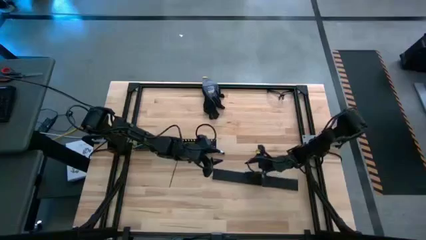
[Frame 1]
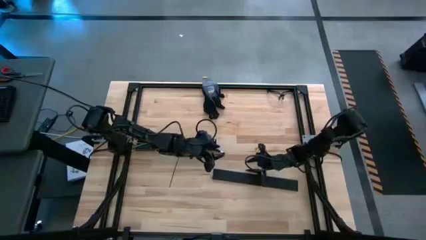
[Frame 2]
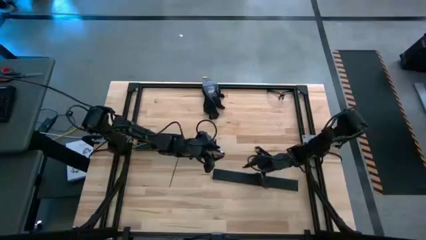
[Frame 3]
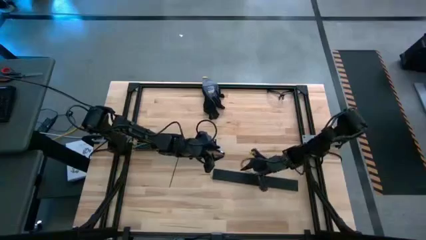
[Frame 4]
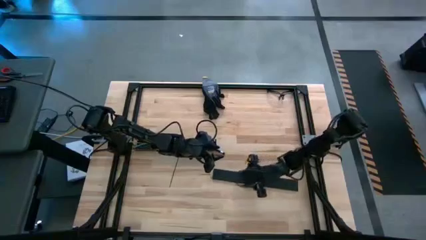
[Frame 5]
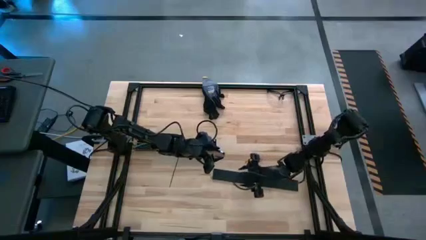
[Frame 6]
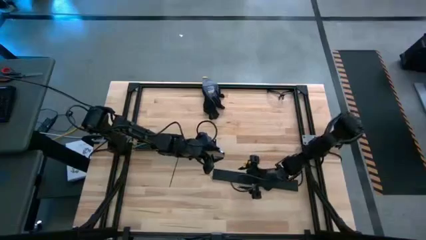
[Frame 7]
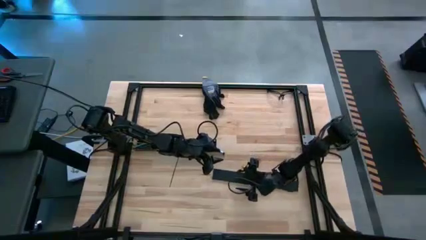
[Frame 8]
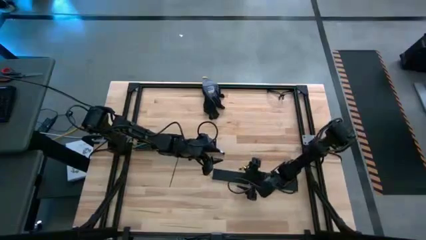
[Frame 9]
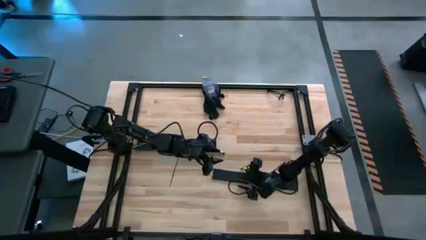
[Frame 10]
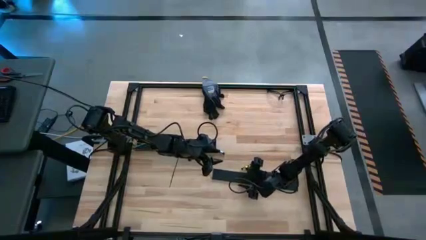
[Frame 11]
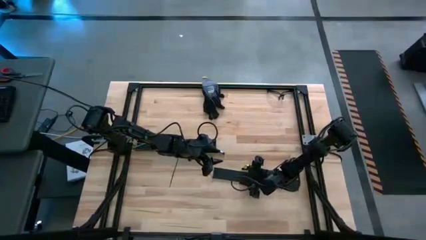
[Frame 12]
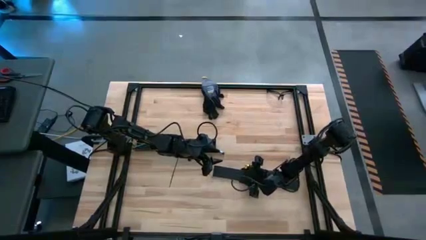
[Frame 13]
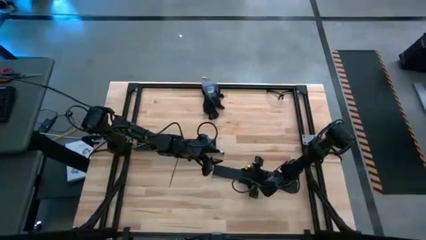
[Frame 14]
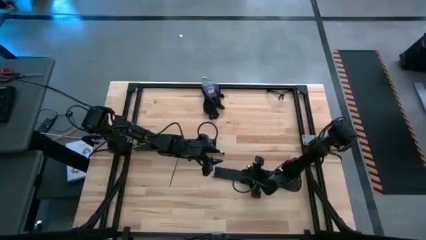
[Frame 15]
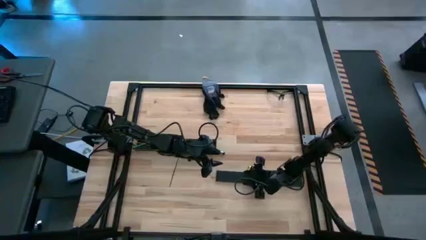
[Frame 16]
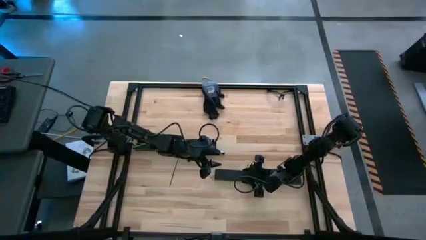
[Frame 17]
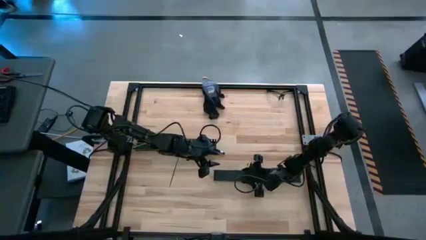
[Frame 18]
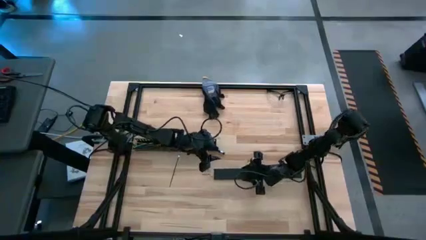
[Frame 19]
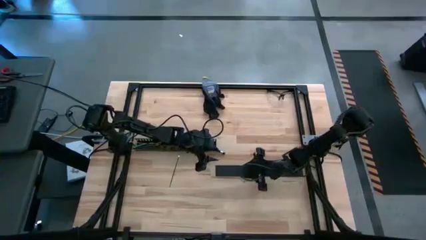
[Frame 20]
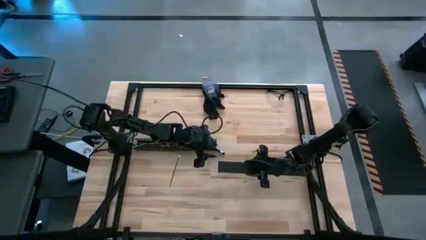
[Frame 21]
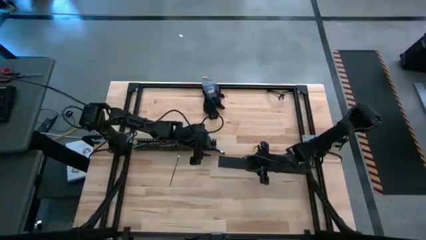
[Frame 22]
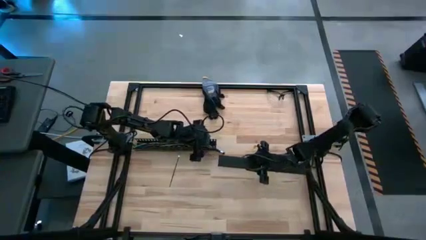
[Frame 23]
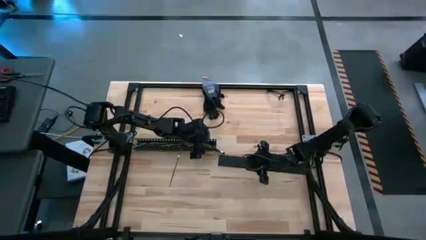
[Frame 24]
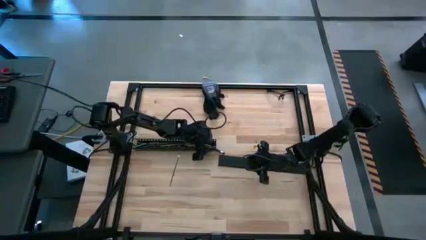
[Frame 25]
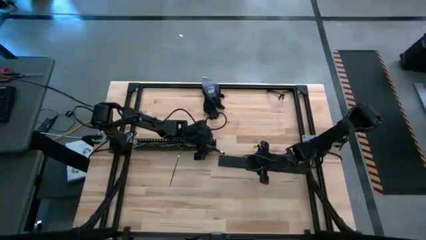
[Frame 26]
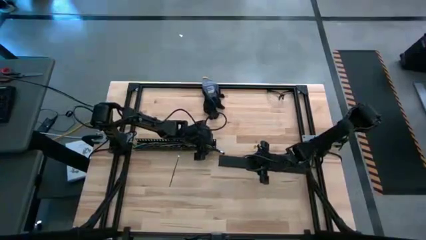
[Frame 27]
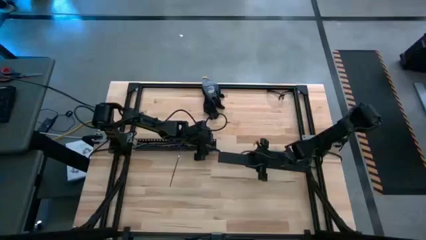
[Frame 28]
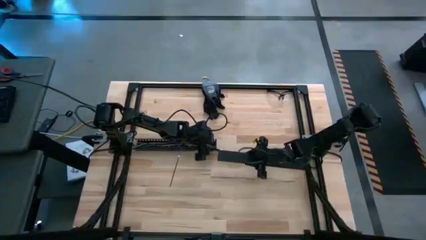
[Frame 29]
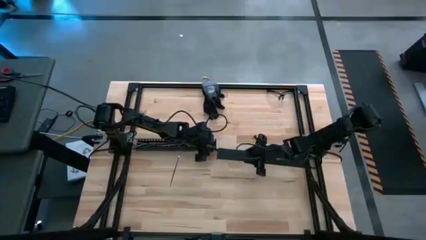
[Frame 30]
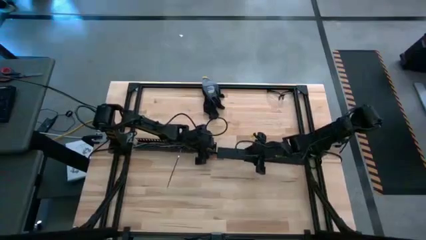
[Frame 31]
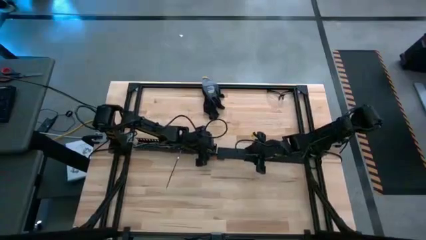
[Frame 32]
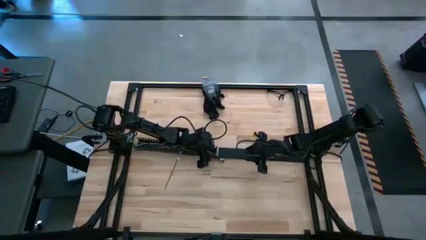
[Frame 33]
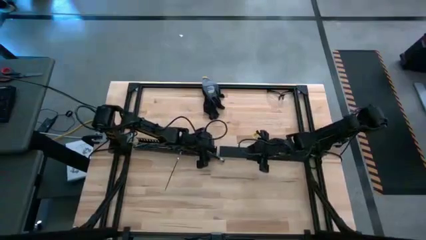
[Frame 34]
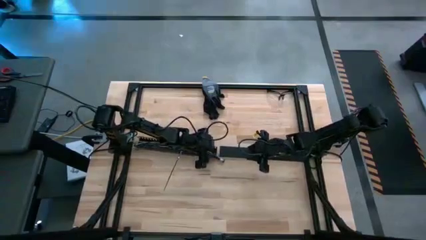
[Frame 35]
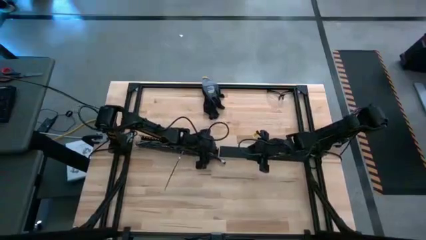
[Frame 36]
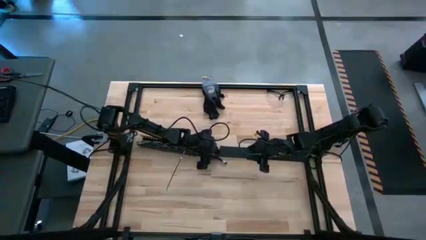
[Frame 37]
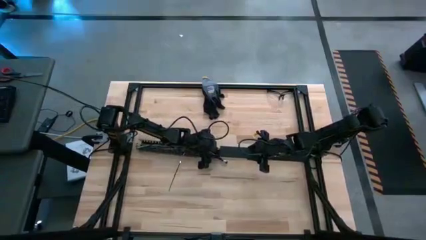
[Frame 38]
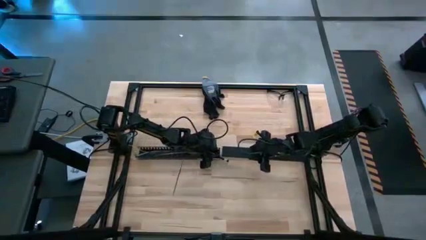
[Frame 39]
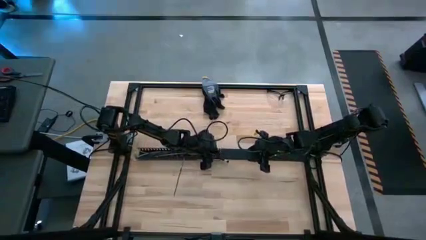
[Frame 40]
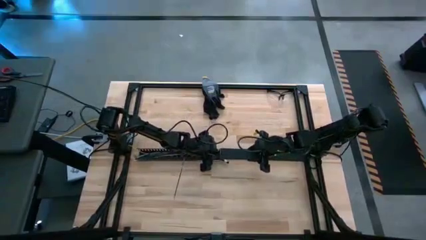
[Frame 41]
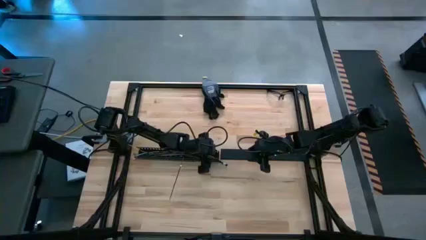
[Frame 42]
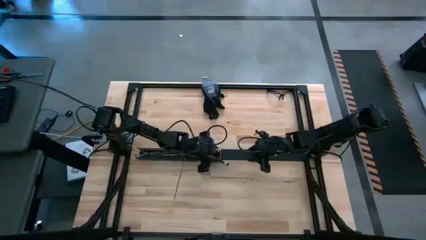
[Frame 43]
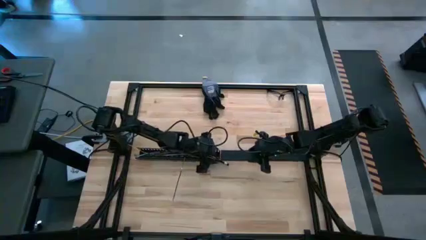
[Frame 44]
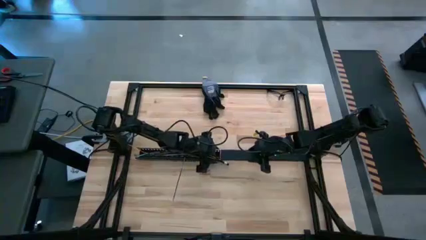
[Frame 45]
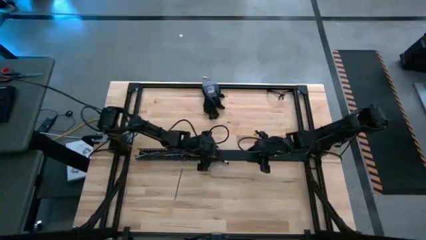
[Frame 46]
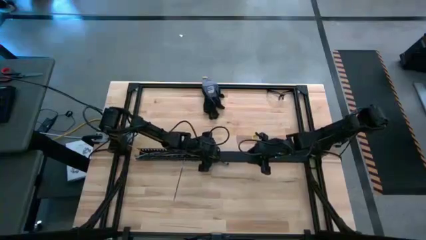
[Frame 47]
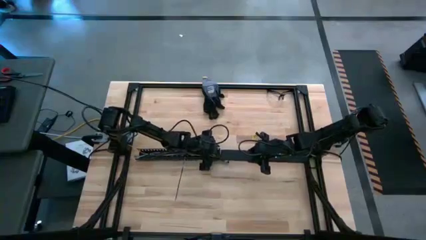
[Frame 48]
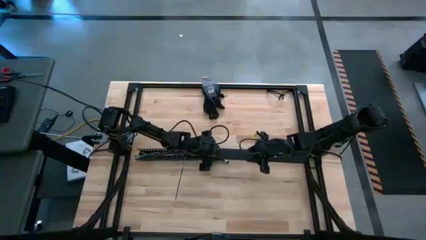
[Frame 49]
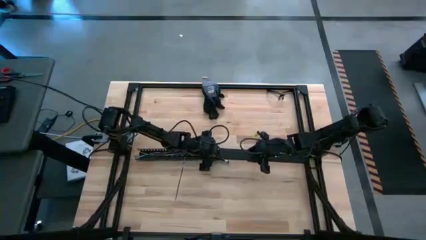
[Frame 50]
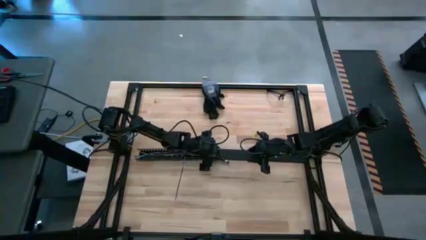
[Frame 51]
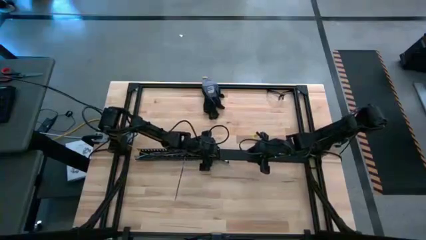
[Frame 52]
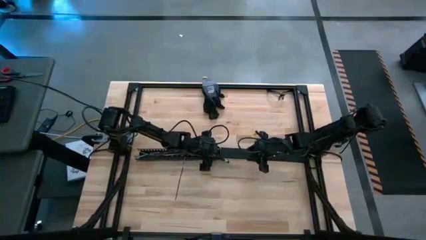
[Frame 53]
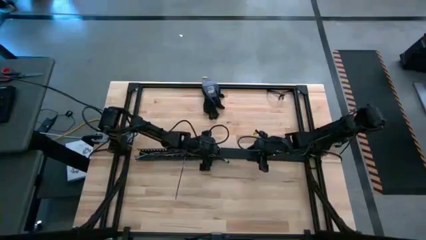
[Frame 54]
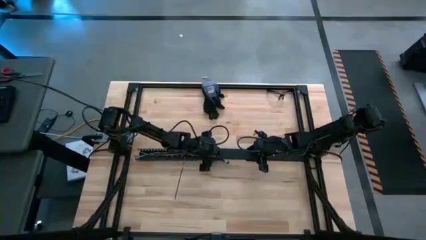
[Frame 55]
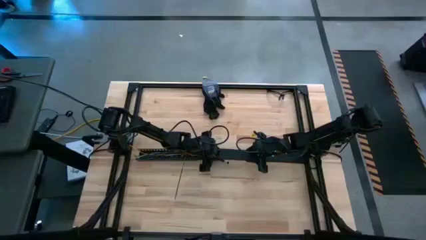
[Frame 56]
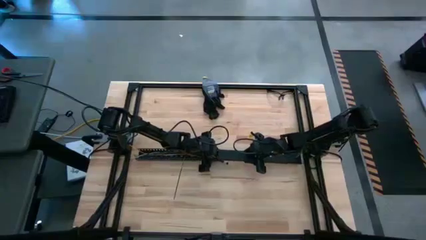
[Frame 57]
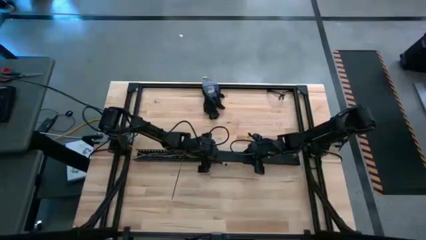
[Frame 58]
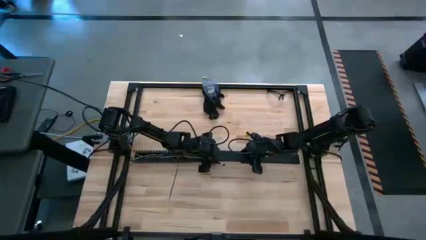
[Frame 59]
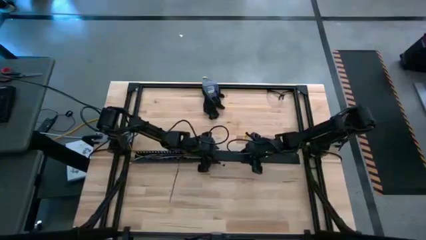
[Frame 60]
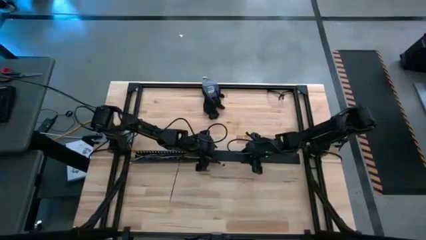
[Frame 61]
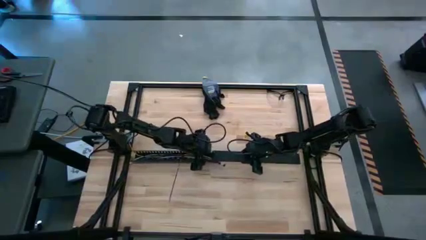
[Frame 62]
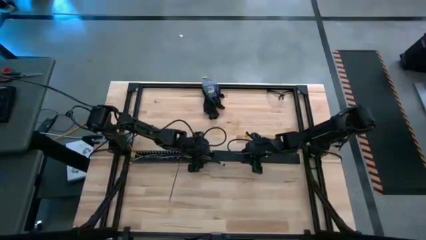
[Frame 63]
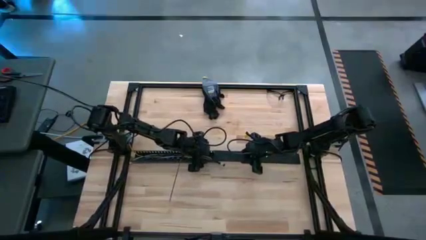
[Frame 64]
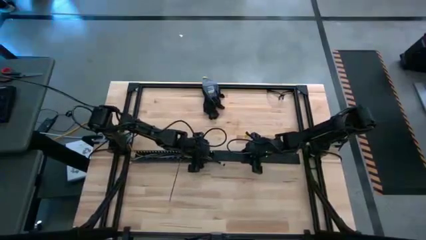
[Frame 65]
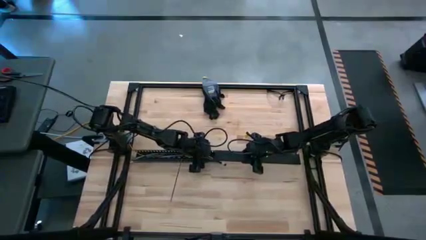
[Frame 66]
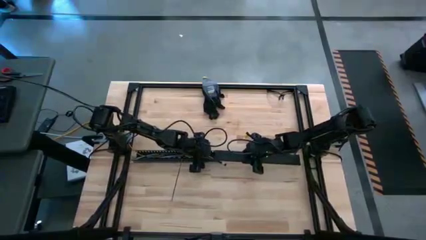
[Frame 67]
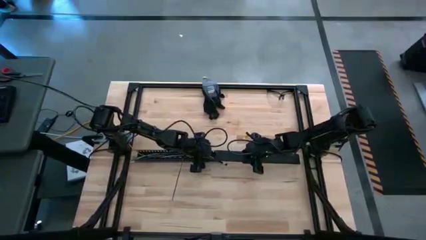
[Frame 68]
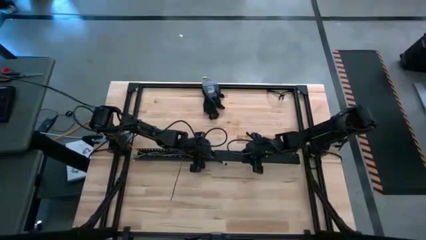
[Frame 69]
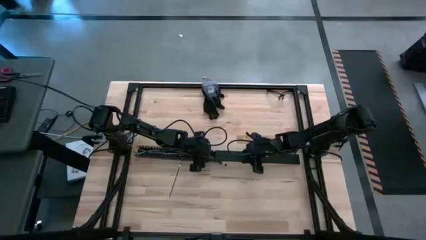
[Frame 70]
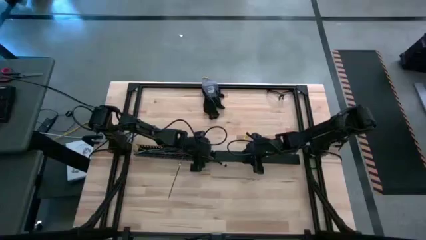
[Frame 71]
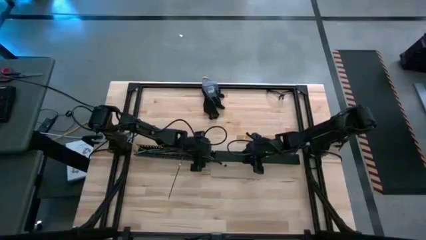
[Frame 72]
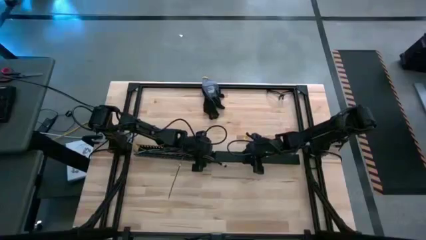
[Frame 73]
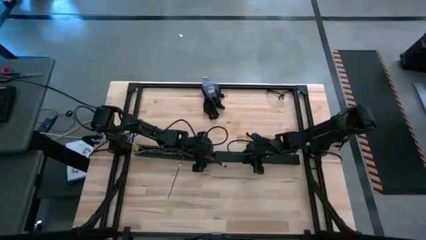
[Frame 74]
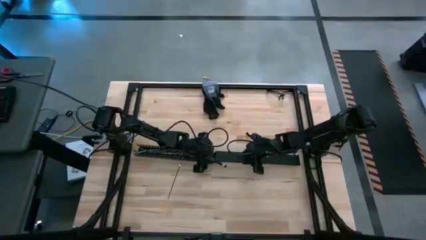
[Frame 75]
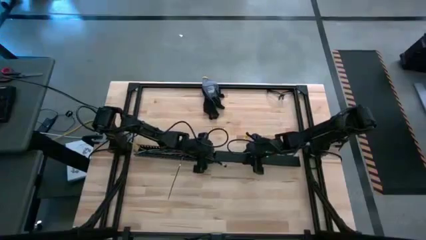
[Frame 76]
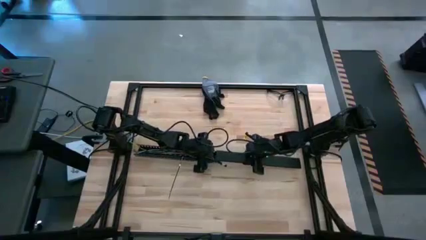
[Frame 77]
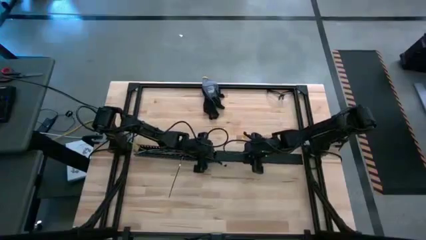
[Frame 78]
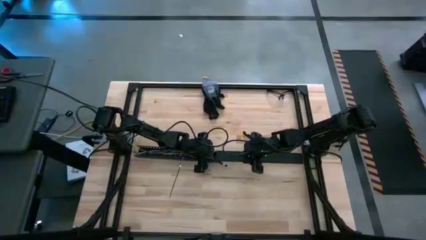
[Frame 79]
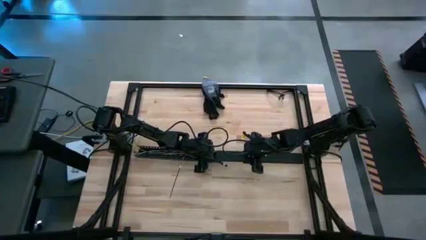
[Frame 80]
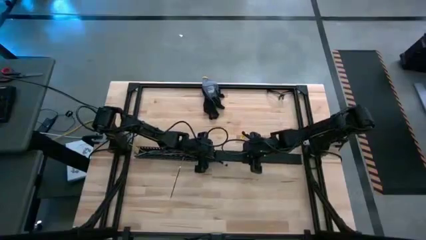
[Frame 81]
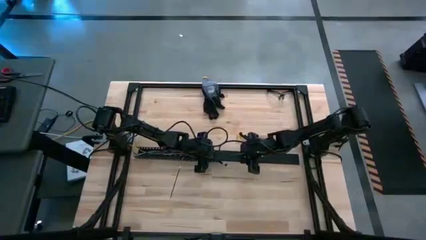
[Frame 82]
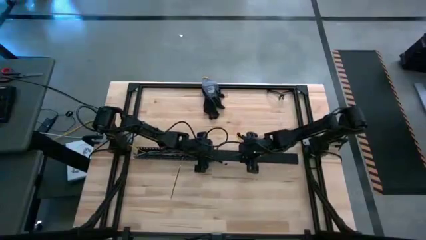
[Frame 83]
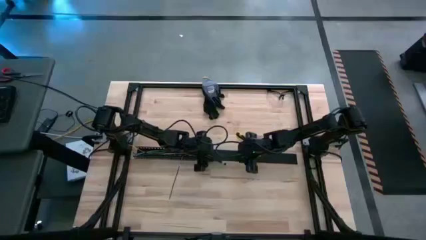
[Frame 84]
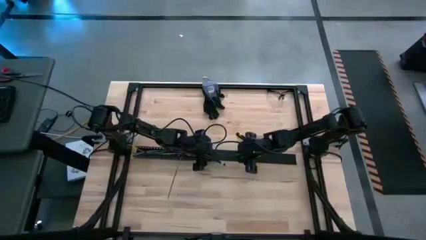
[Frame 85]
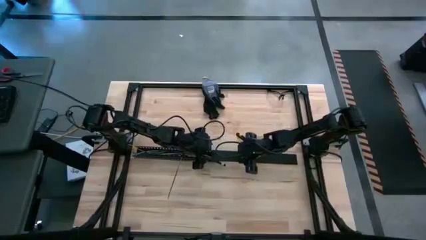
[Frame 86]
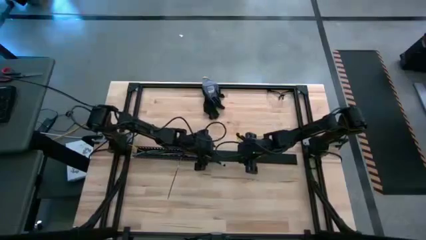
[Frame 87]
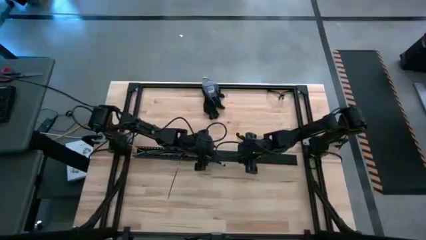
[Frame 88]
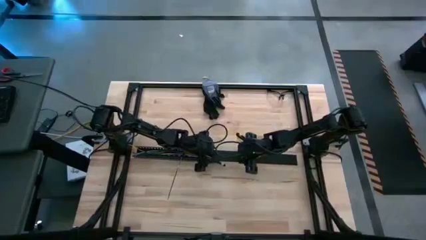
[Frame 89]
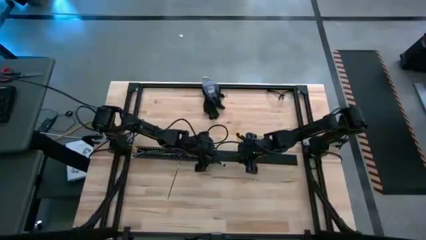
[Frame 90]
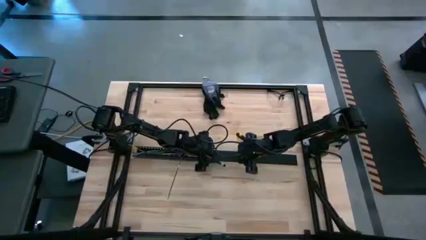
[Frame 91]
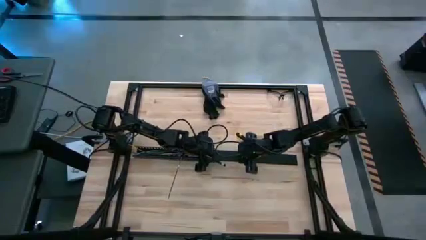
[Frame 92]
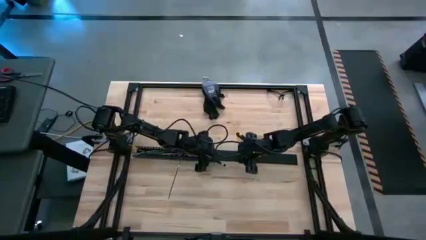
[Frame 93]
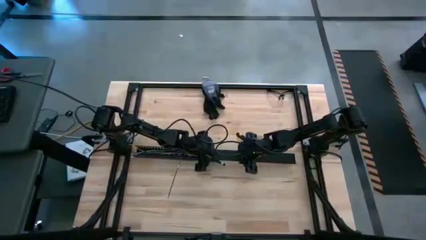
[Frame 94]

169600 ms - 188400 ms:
Task: Ziptie cables
Close the black cable duct
